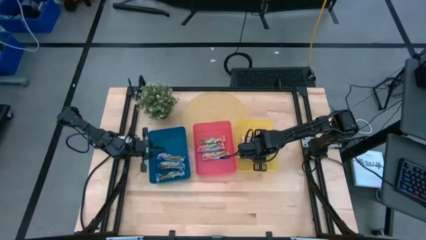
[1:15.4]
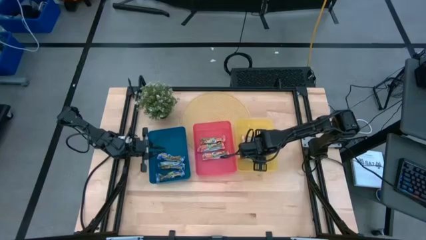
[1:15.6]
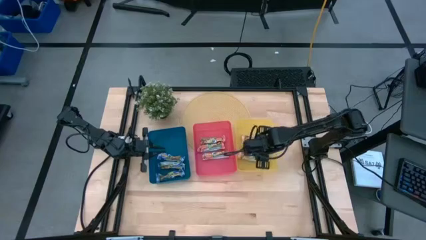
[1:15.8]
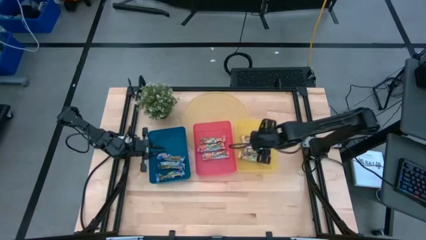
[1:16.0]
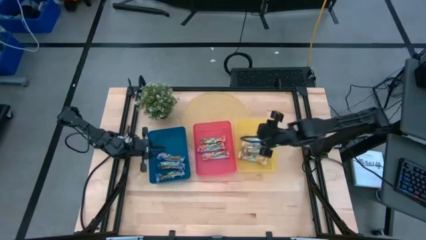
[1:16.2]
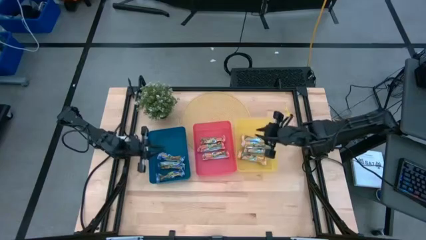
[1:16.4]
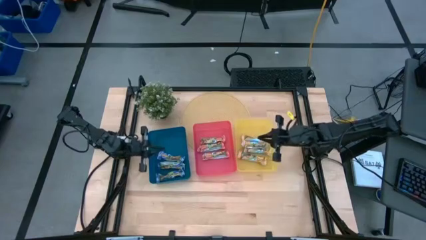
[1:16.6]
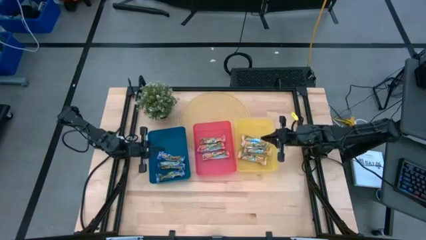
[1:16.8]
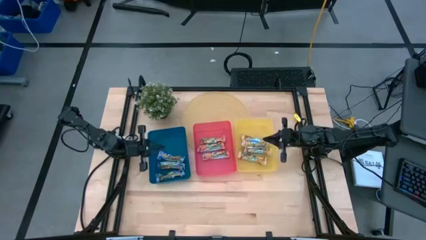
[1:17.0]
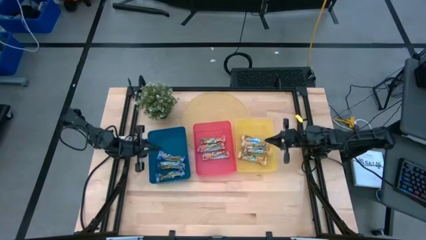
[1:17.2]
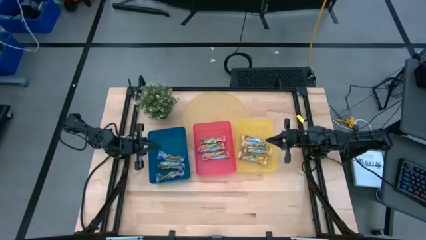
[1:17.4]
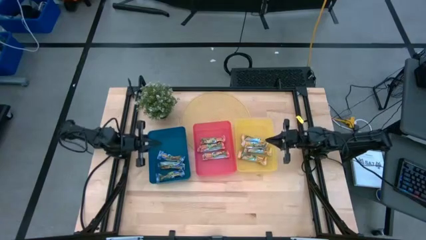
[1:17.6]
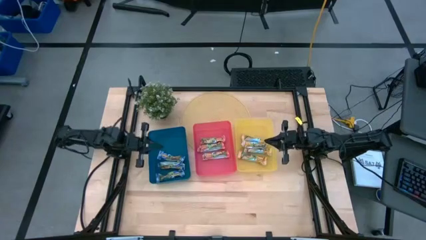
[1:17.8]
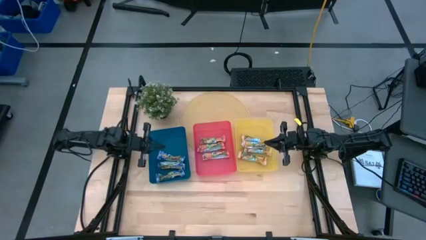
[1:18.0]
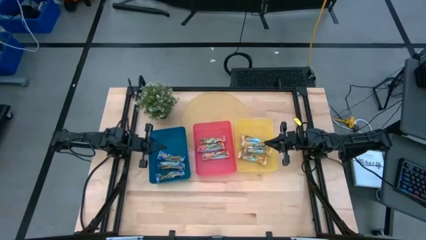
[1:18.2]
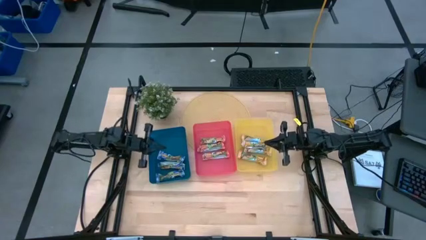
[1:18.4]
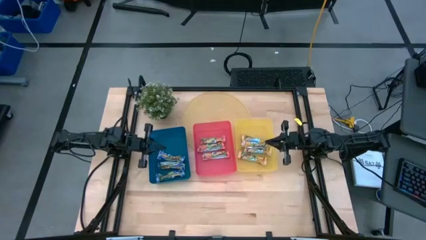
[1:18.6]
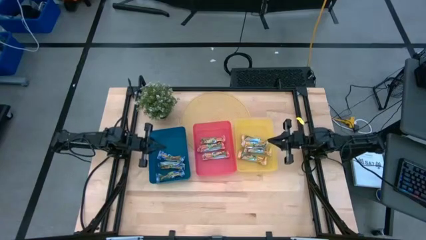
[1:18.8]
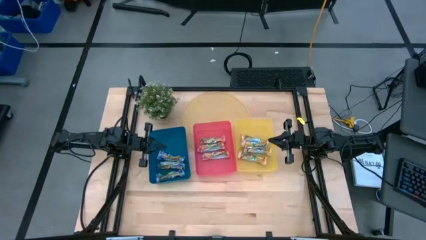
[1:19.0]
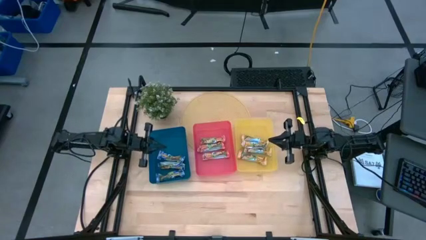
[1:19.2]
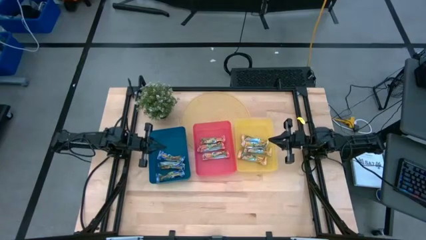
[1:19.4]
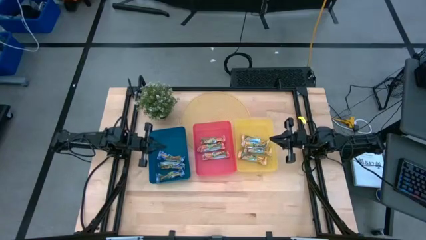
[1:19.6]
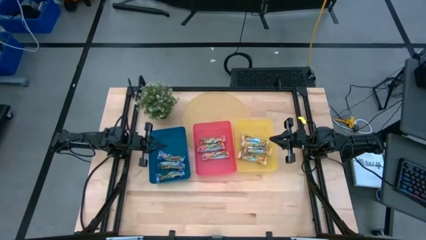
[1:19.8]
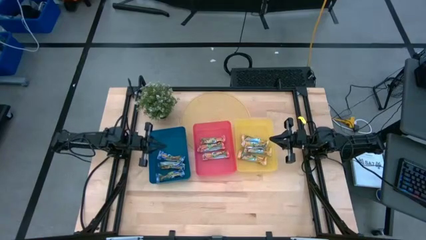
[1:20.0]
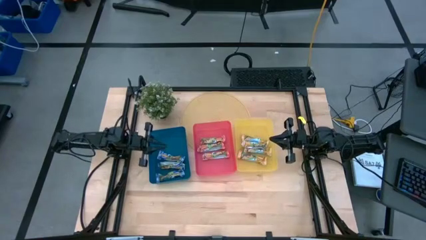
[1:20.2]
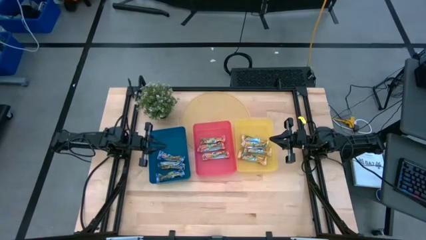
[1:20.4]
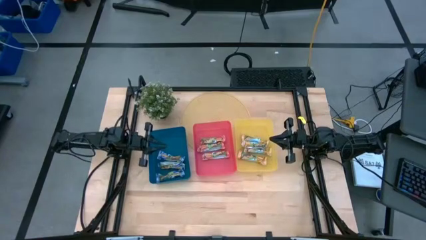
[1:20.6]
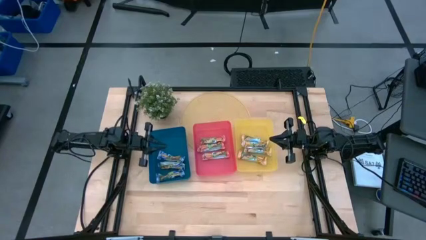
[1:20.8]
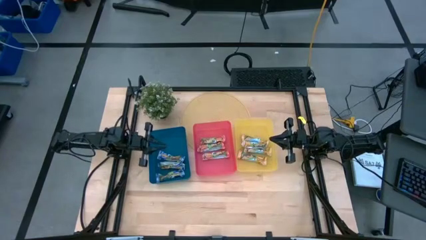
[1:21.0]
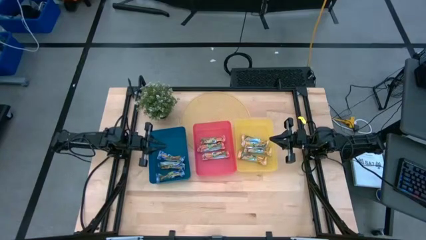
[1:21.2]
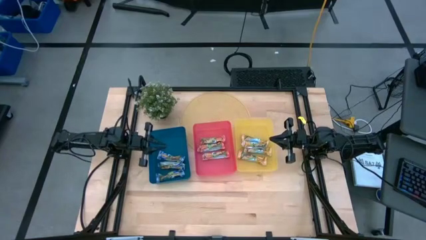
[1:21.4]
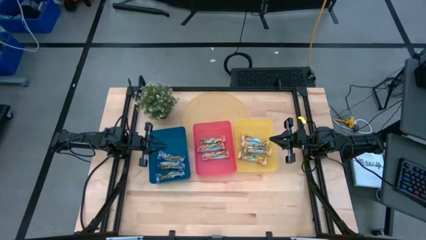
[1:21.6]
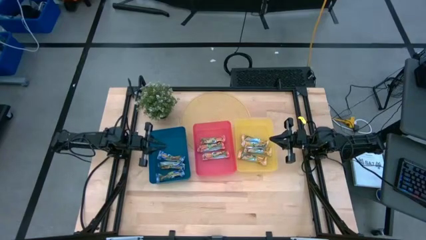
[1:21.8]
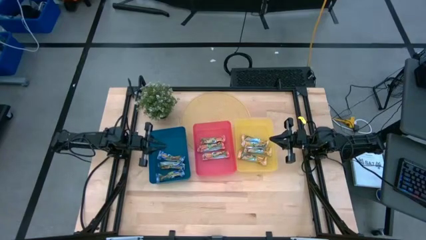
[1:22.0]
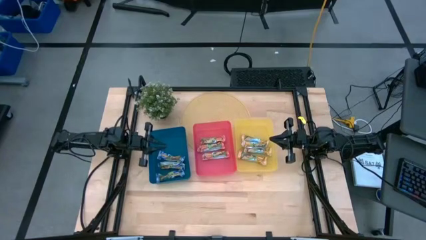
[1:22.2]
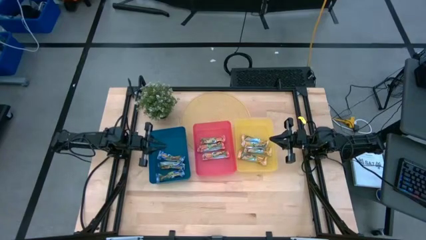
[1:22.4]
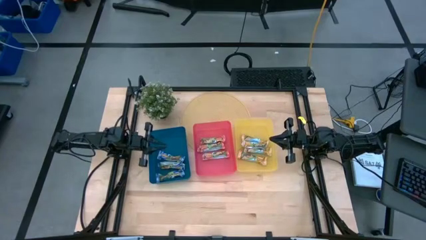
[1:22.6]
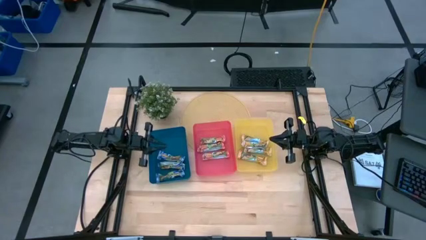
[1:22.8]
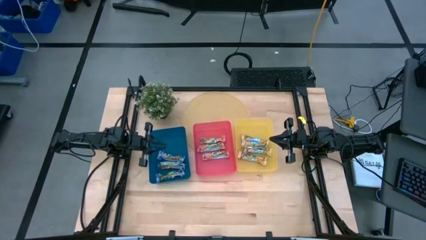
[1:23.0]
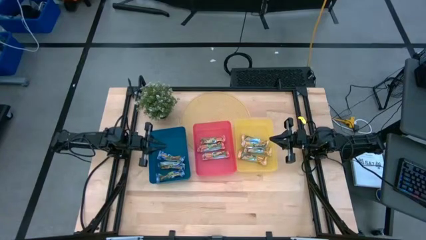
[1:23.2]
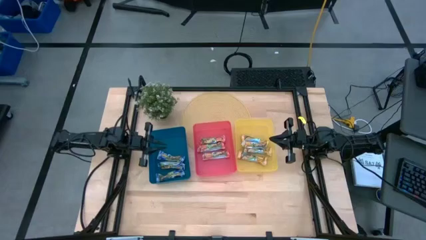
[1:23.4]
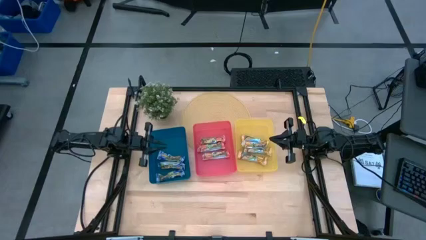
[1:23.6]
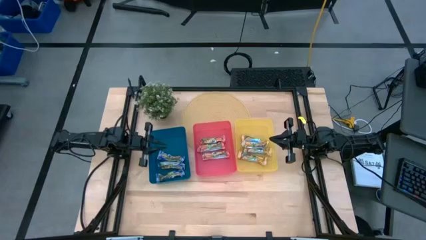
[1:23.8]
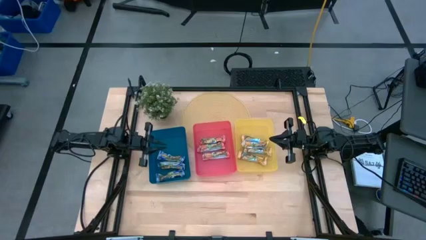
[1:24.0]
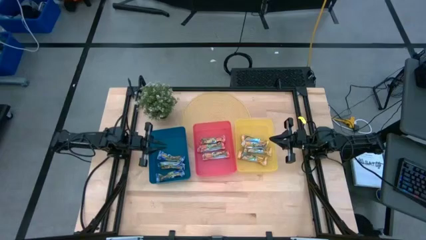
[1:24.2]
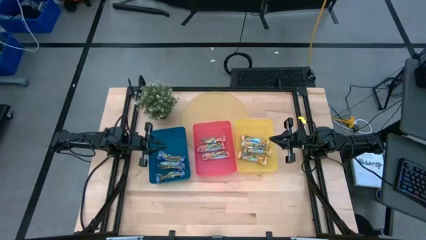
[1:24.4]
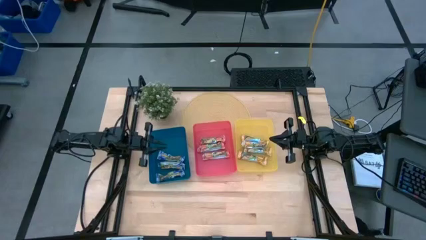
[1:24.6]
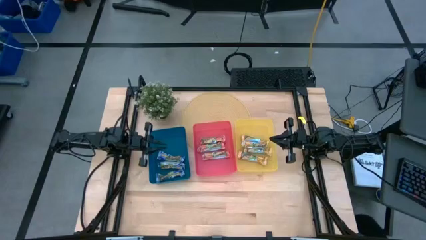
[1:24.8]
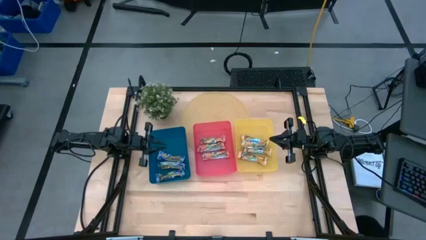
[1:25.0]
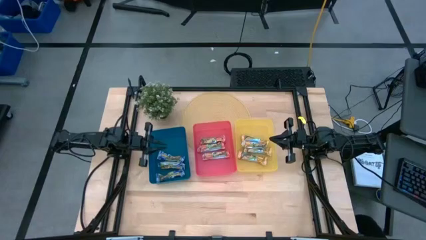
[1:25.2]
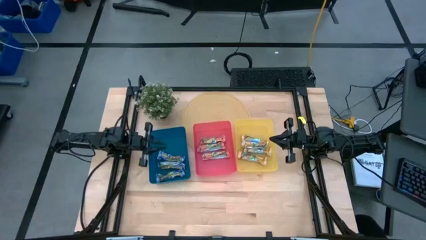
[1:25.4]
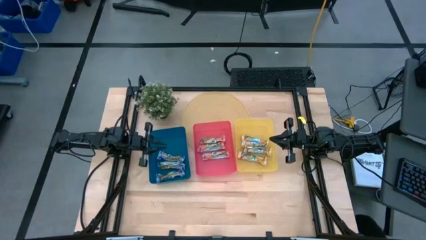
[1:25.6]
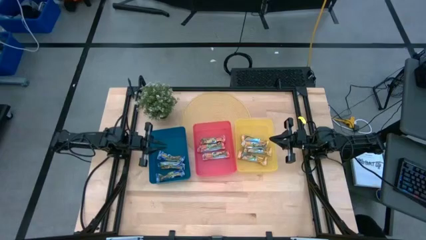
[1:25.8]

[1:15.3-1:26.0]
Task: Pick and place Granola Bars by type
Return to Home Position

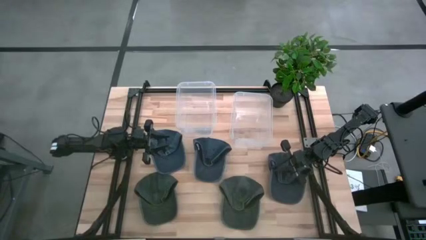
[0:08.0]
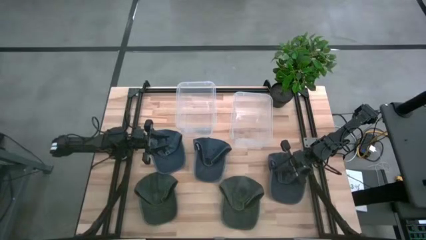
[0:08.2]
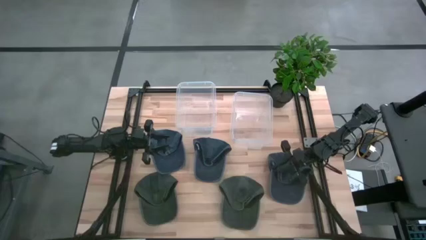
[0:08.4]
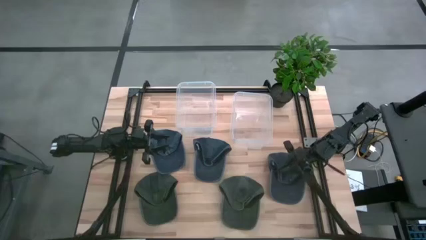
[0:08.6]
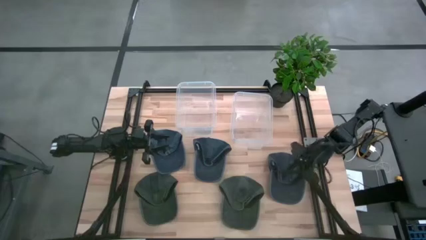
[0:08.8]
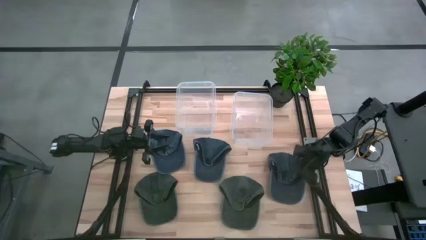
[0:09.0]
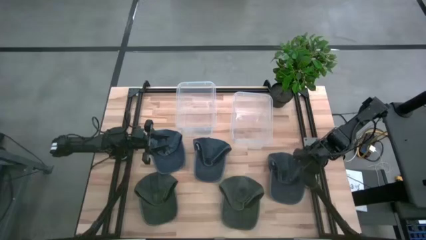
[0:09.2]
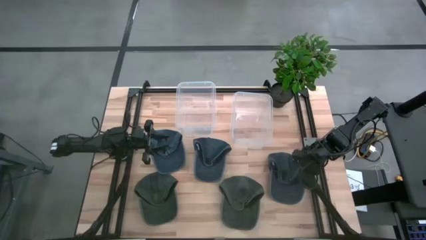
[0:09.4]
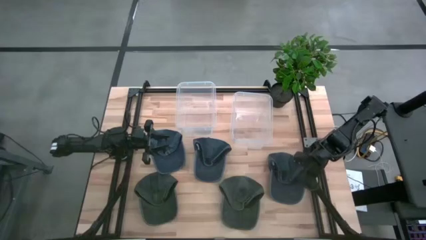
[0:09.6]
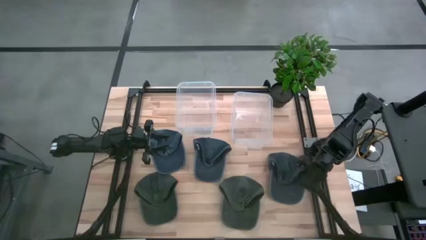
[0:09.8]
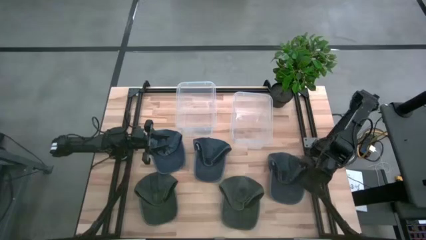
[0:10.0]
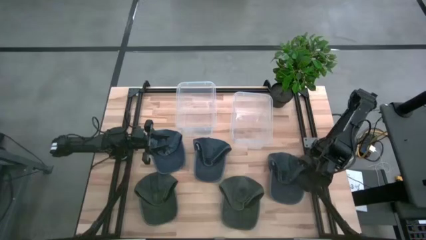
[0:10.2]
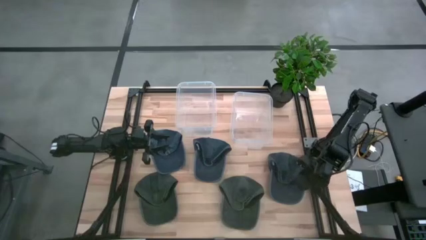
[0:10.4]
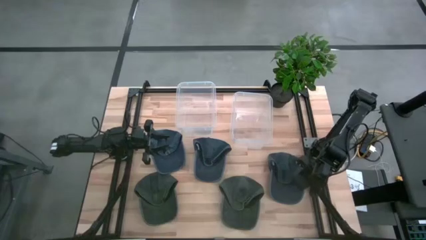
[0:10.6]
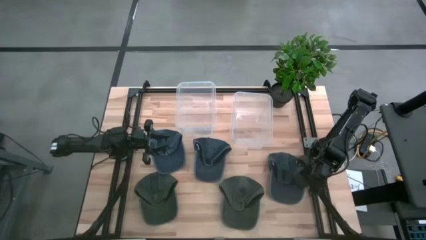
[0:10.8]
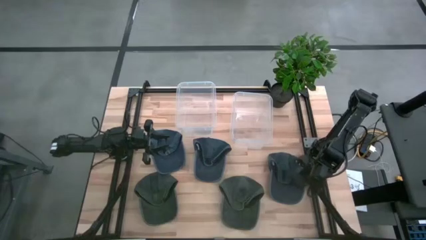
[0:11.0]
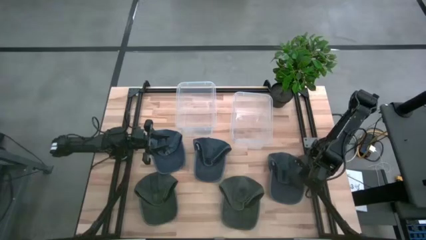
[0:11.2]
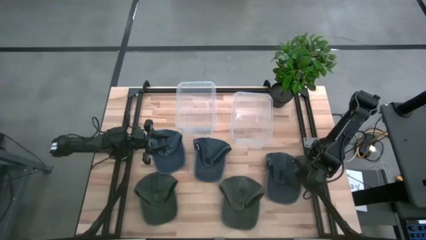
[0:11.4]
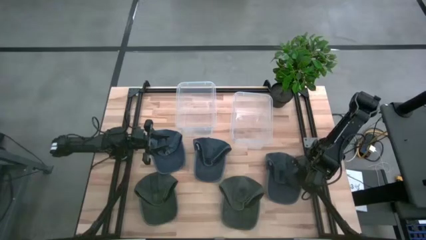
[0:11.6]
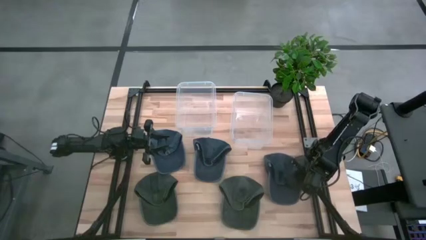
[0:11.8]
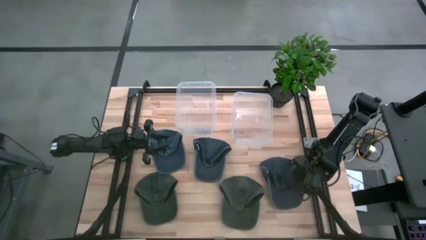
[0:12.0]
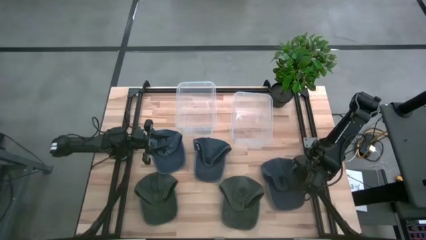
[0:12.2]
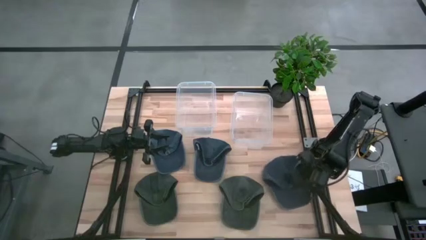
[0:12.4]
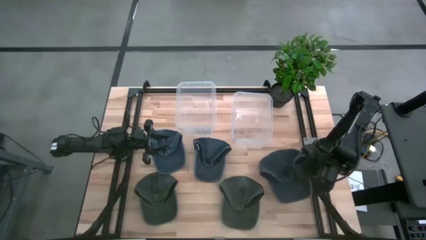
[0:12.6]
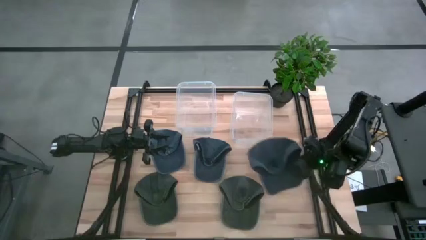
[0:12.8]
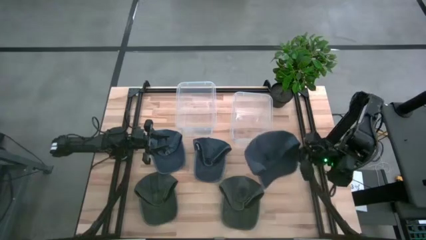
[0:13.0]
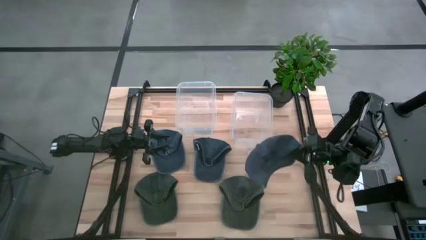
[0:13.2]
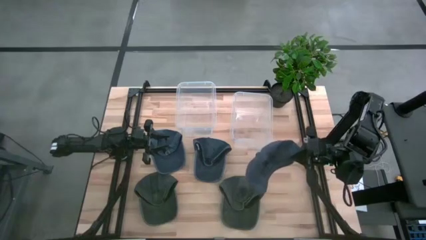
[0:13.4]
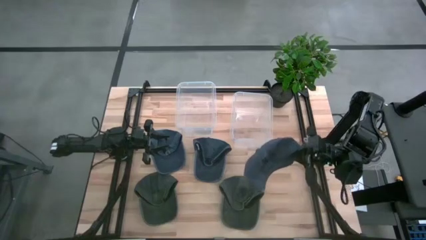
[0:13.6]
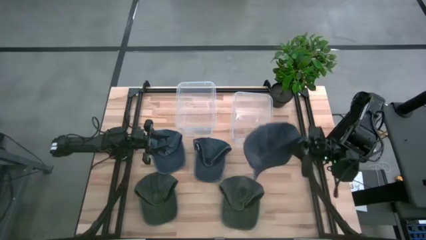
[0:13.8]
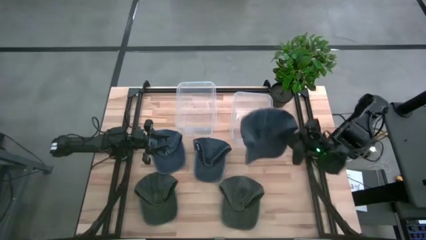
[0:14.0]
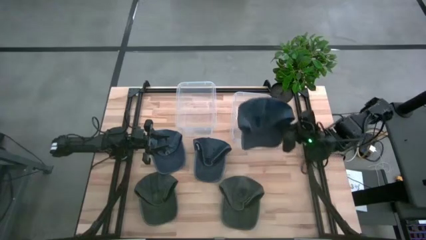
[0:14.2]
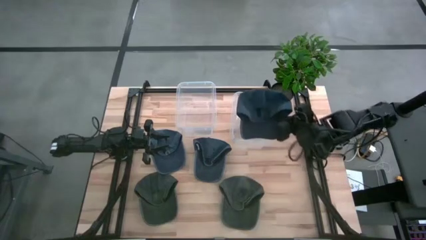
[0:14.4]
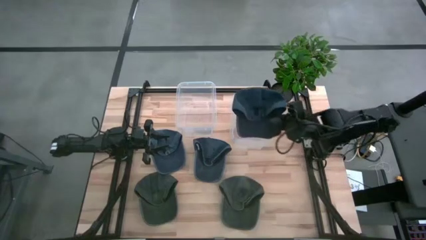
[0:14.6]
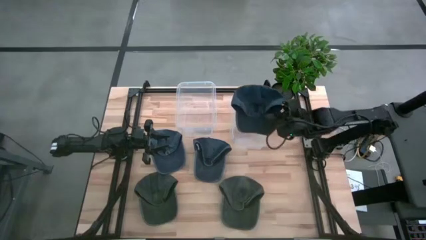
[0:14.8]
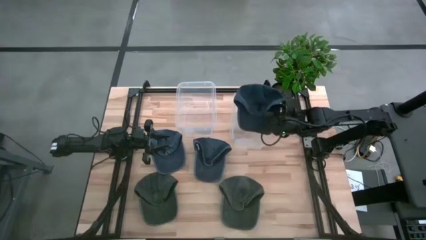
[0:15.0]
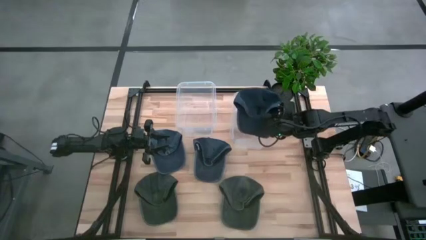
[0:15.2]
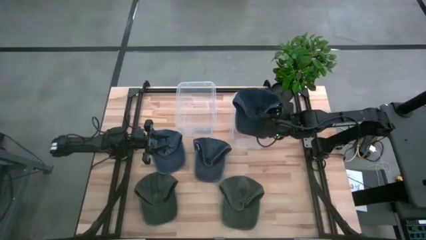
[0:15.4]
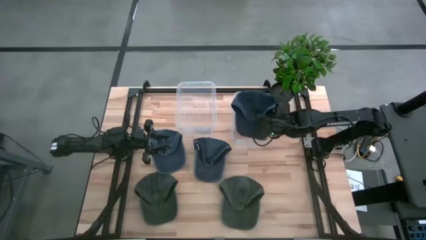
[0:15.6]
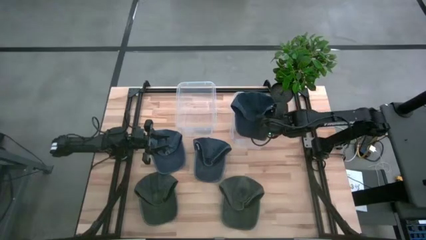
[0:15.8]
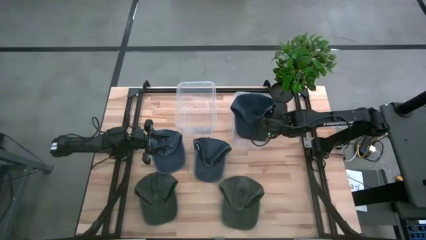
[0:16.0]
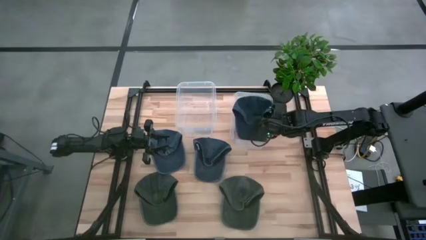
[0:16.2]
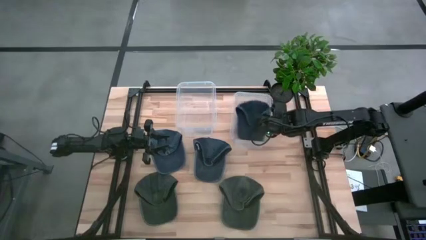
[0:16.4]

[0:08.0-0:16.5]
Task: Pick & Place hat
Put the right blue cap into the right transparent bin
